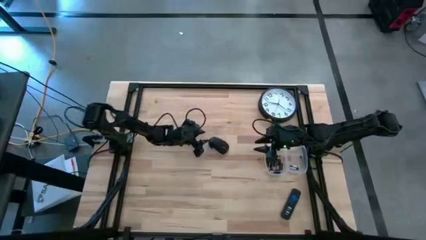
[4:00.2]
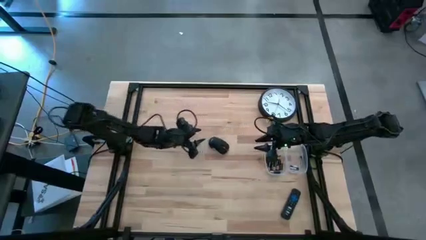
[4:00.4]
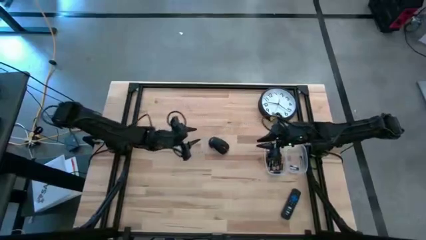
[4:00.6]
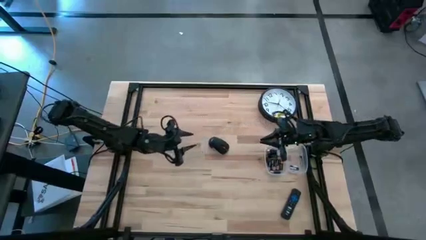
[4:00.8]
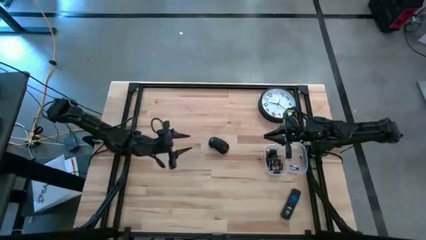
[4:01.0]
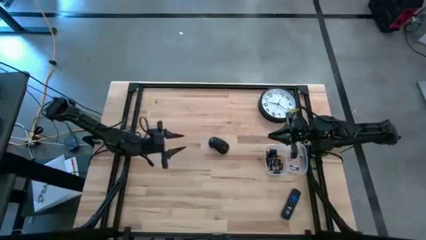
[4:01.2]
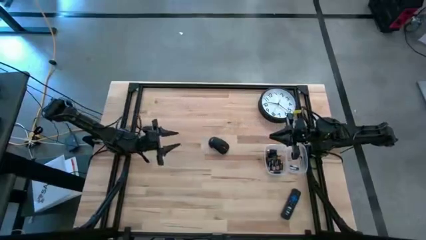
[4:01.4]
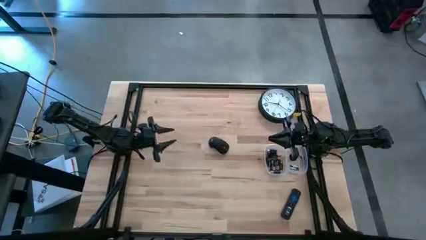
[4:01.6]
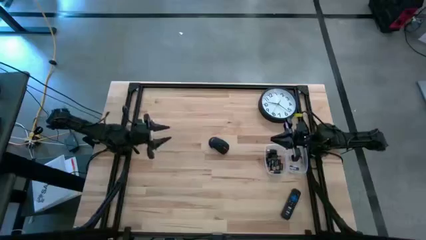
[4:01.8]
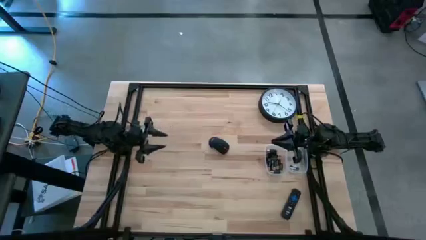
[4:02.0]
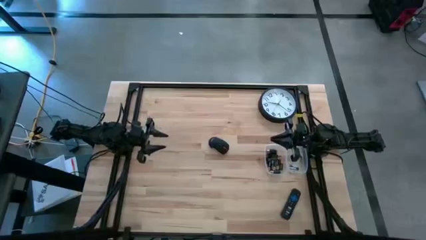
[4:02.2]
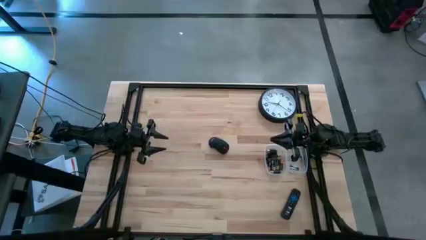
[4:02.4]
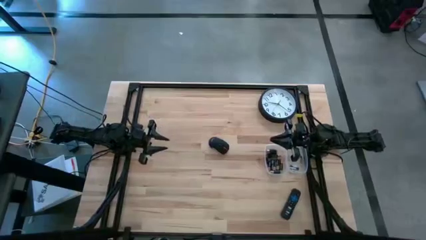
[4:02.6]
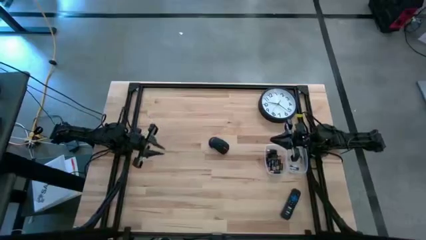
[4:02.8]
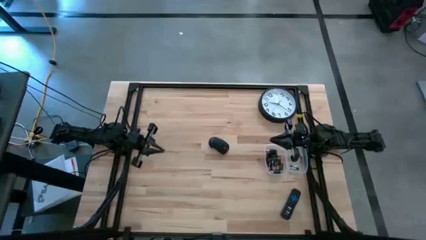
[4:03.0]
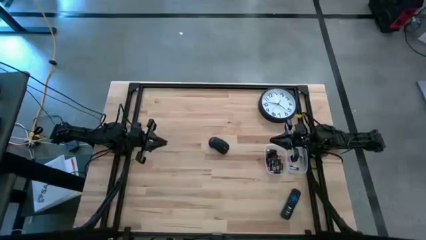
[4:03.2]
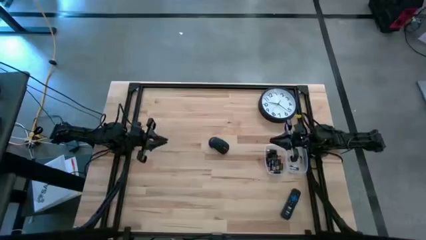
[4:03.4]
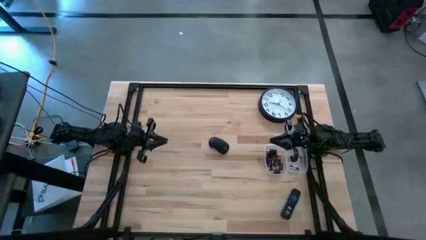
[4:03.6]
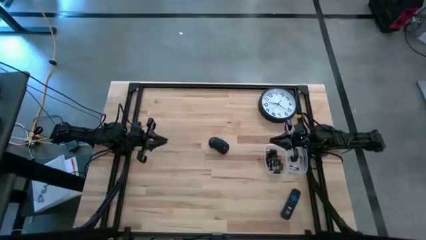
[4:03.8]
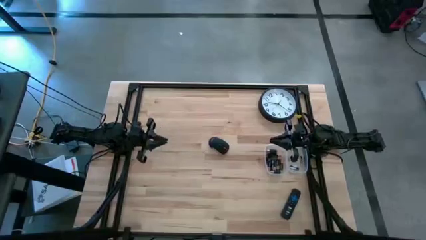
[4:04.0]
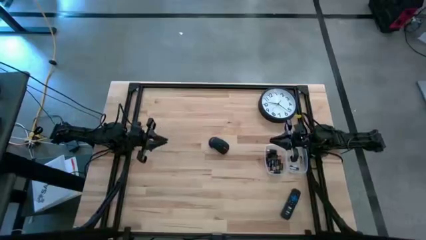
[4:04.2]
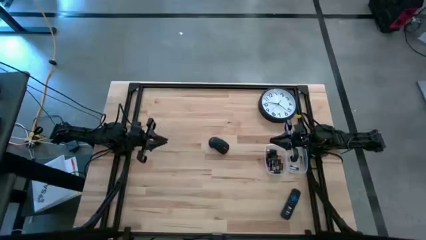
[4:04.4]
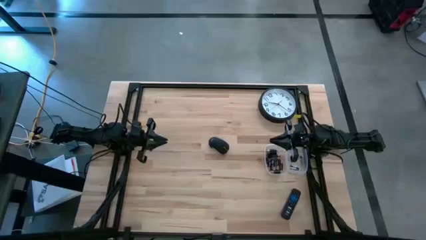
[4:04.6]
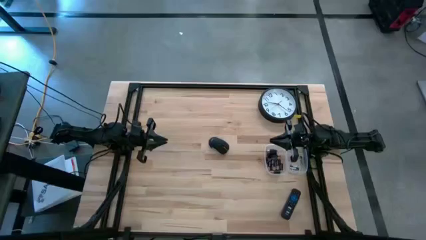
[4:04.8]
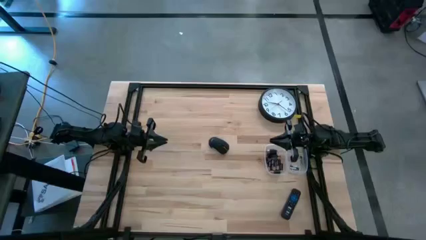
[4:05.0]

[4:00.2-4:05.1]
Task: Insert battery
Return to Home Position

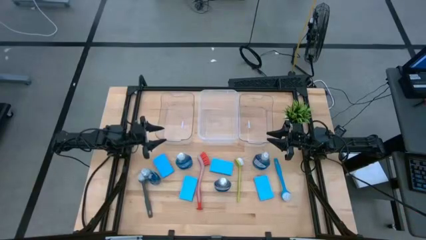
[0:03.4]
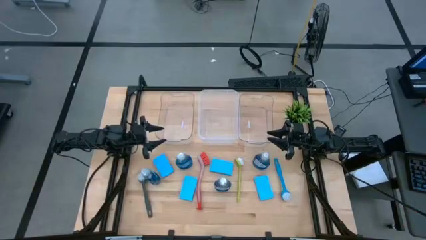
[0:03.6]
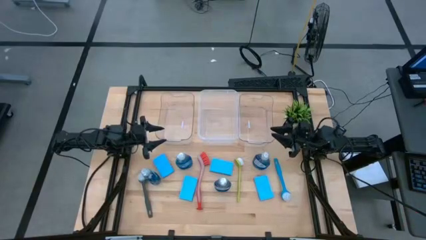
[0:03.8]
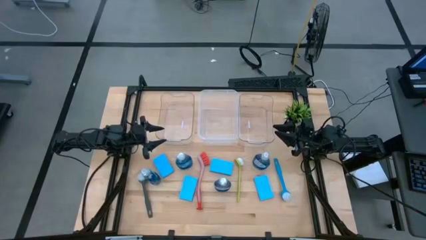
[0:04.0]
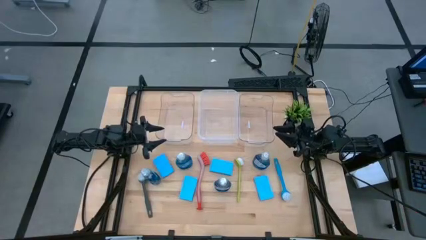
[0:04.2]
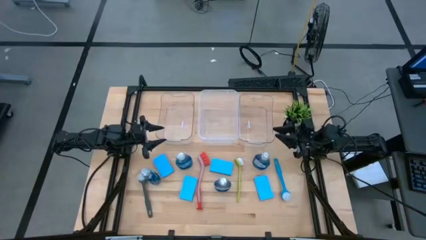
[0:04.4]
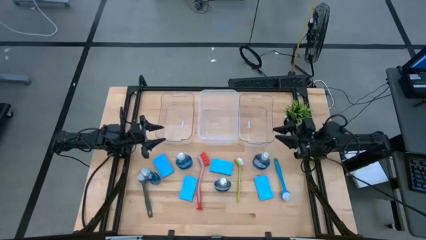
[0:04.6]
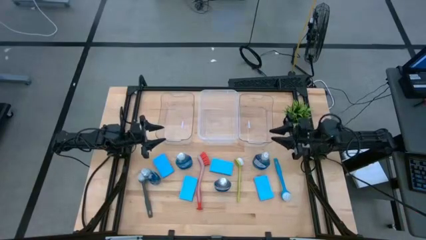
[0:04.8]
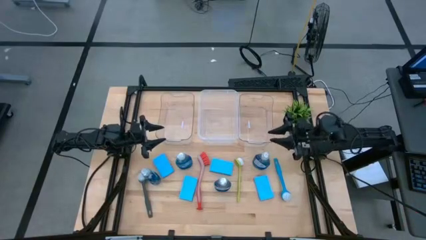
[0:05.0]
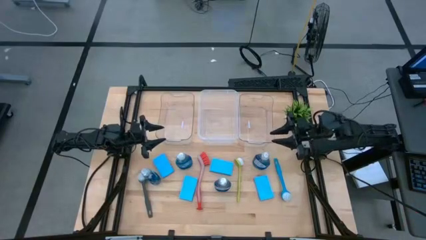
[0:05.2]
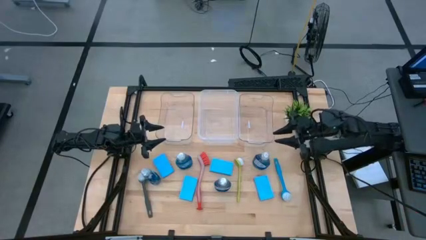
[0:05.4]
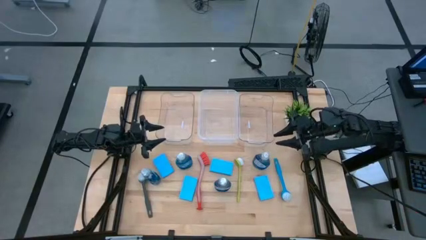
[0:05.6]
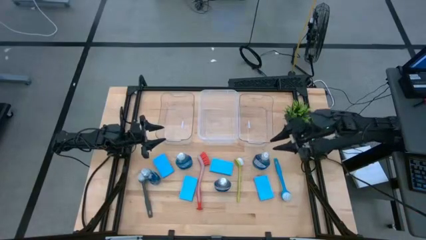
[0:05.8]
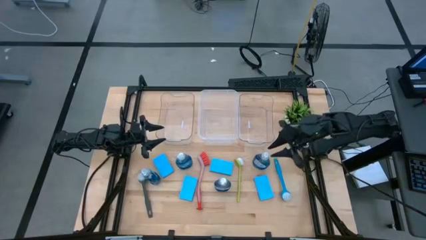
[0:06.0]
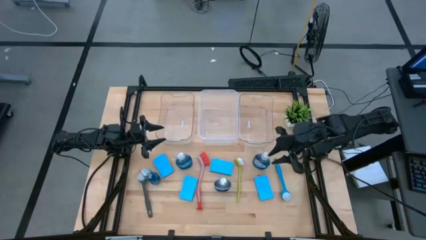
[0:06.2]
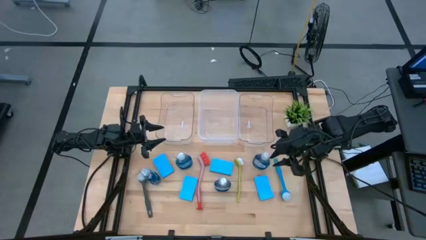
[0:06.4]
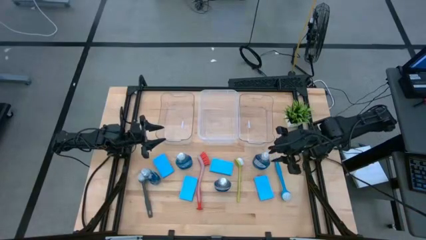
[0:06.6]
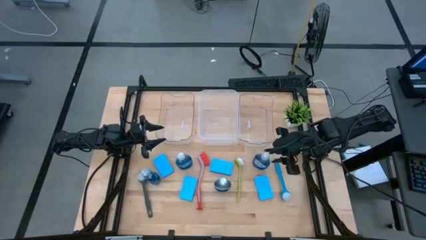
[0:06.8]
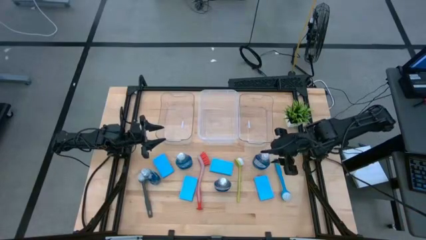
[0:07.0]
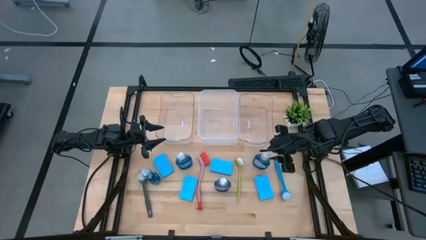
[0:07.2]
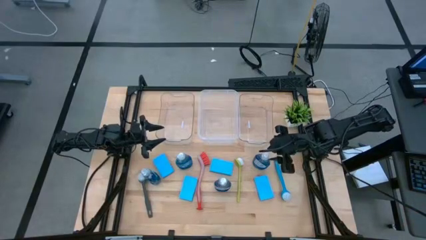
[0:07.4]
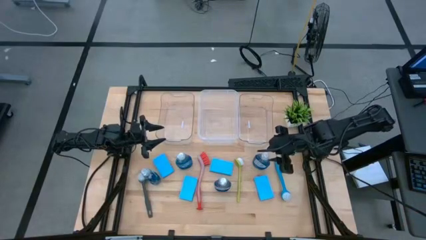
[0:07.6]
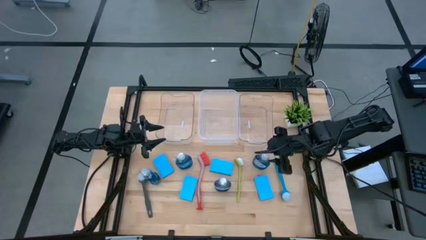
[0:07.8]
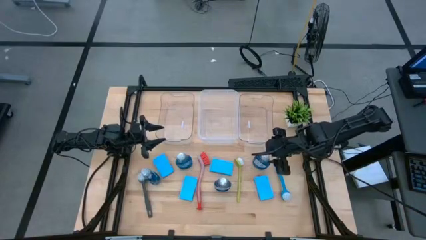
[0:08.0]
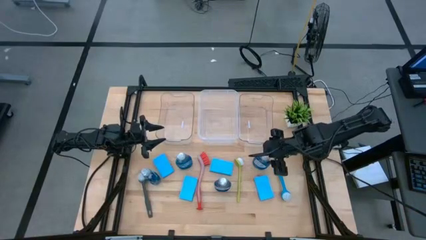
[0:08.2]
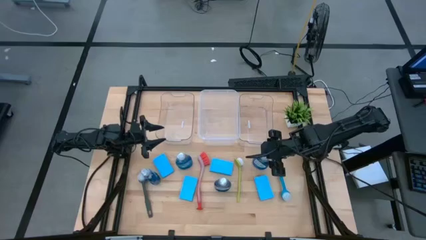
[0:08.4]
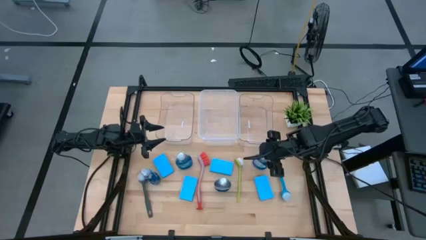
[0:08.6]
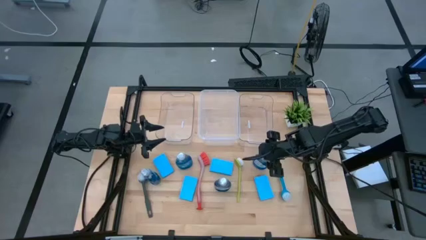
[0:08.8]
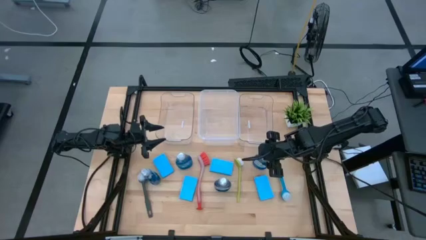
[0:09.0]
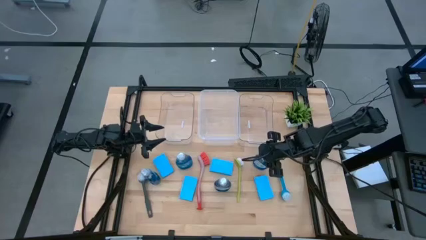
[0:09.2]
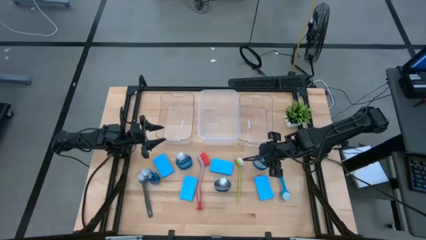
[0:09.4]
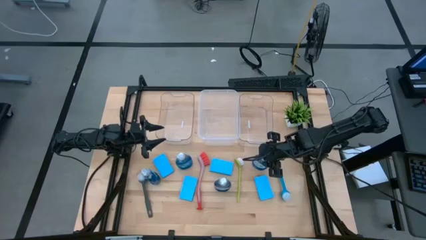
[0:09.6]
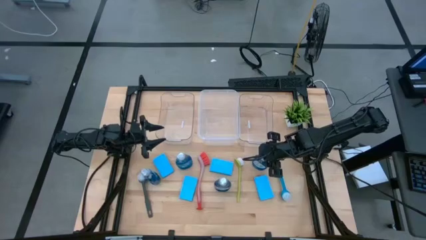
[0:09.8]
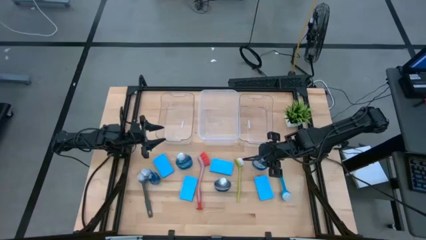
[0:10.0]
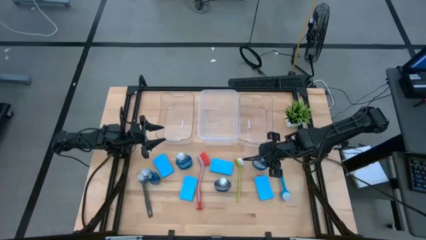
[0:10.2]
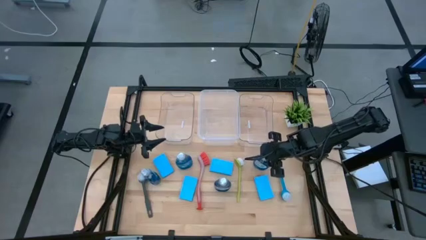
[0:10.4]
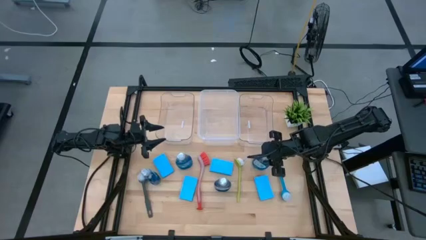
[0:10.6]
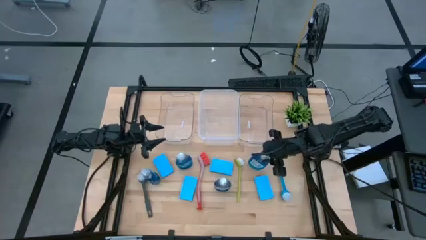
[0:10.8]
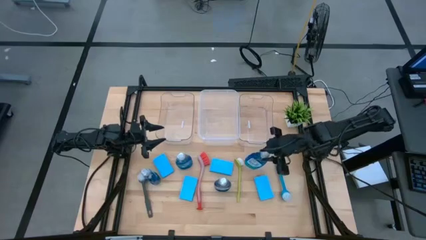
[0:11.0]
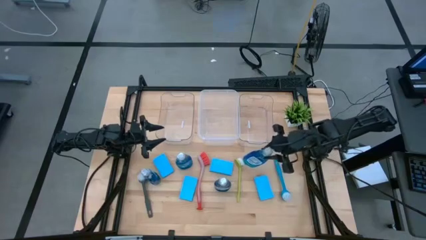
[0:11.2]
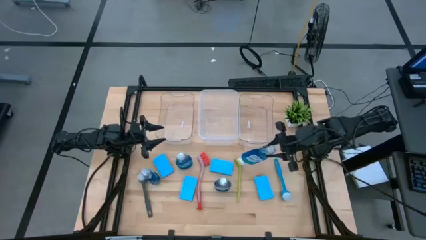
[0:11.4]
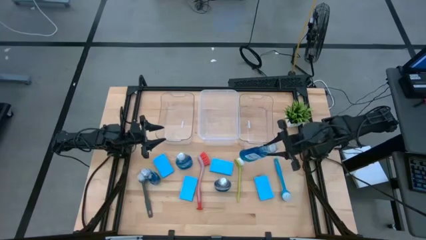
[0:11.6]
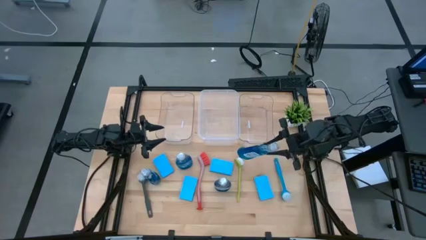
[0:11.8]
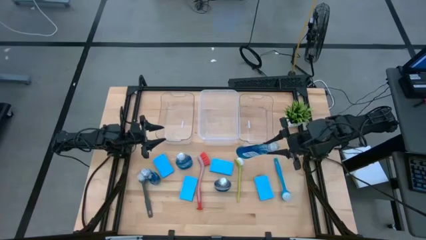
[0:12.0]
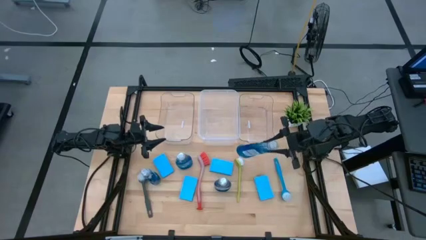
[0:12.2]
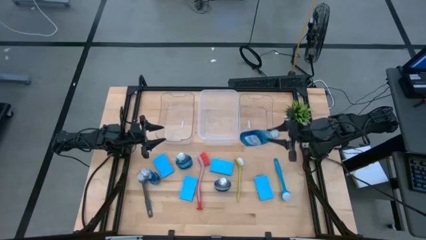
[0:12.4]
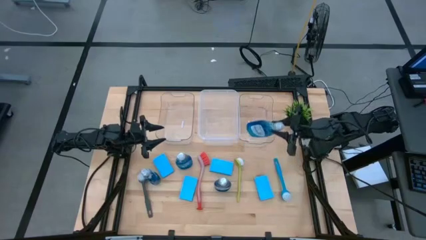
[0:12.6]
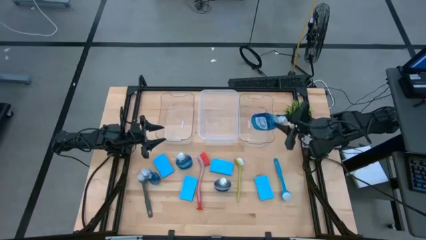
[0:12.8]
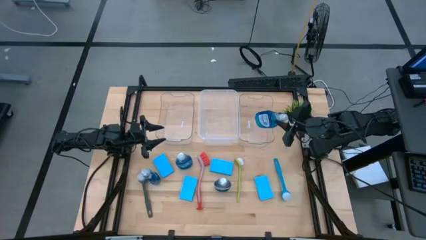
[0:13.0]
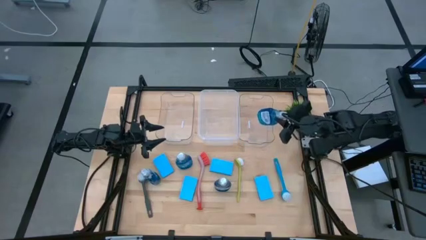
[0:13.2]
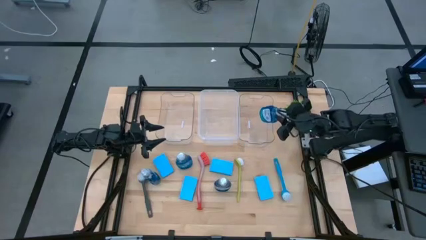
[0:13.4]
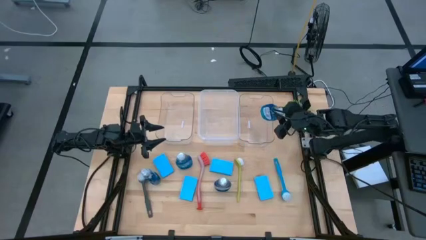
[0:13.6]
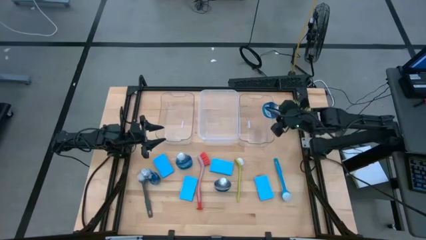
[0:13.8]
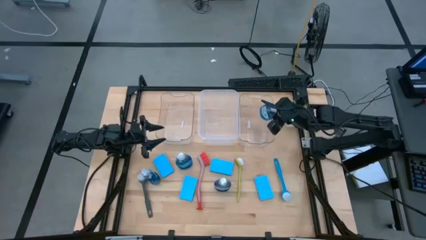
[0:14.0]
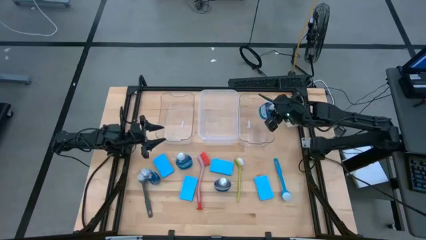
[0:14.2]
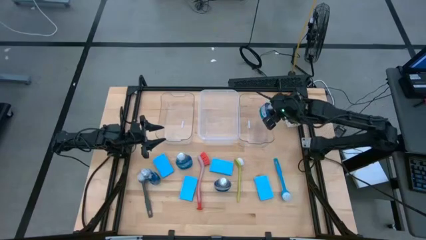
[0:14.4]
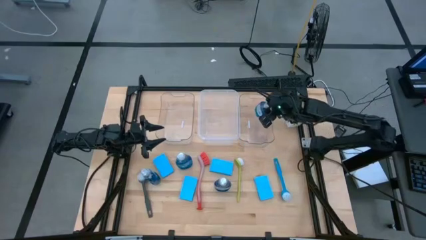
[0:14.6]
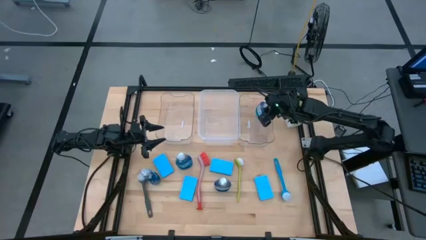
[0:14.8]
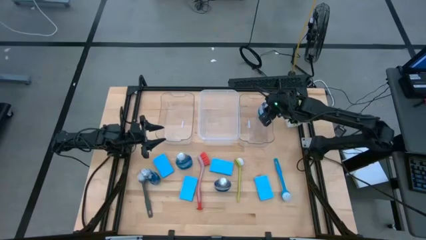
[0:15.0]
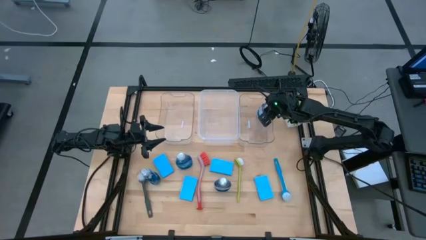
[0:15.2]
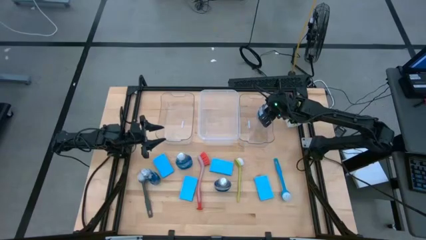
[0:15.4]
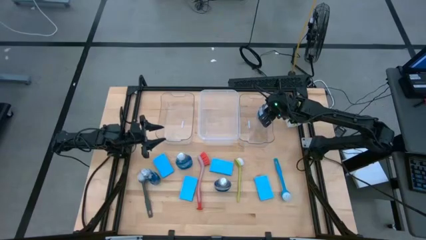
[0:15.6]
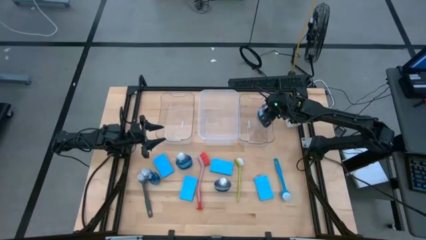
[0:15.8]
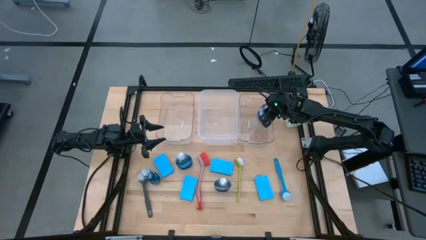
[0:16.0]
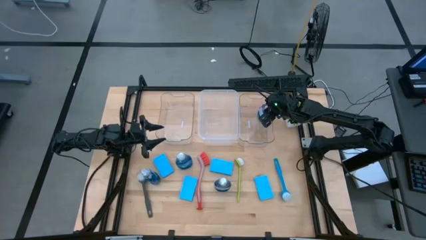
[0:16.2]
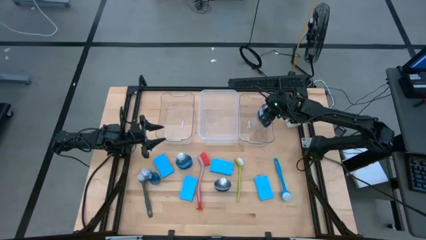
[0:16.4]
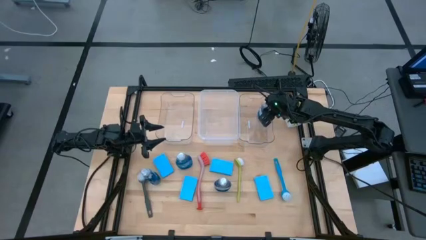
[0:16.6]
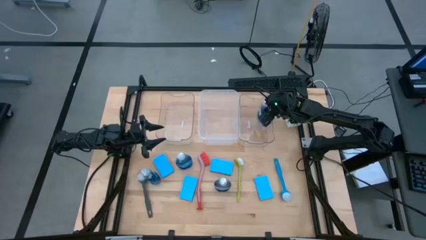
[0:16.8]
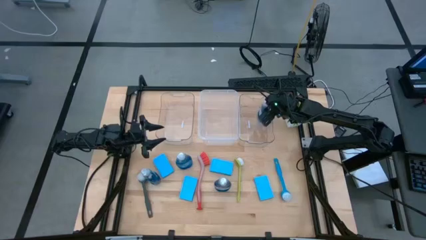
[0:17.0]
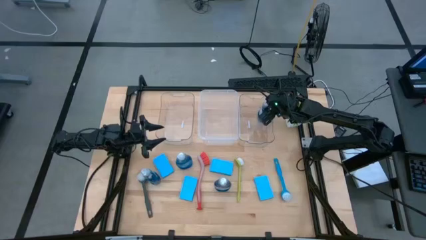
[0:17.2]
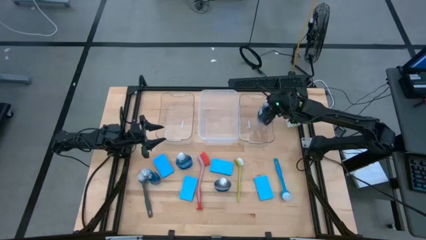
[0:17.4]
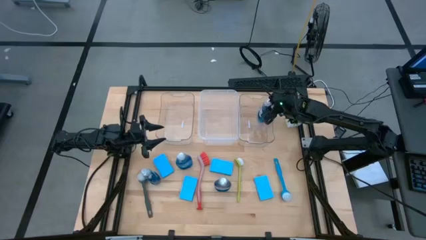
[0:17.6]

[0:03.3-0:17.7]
Task: Pick & Place Kitchen Sink Supplies
Put the dishwashing liquid into the right transparent bin
